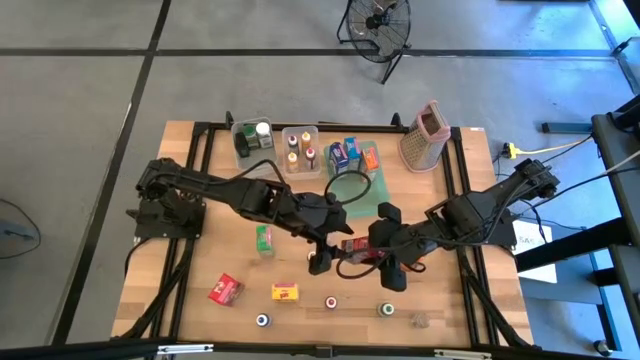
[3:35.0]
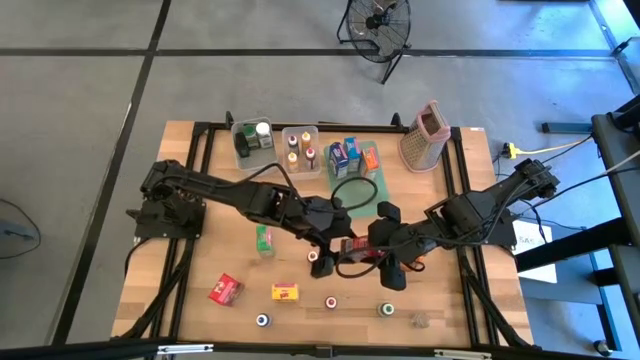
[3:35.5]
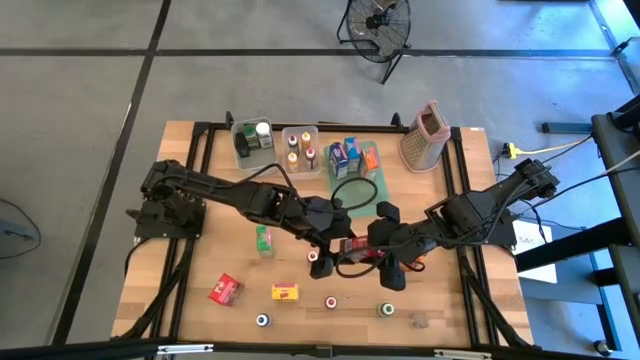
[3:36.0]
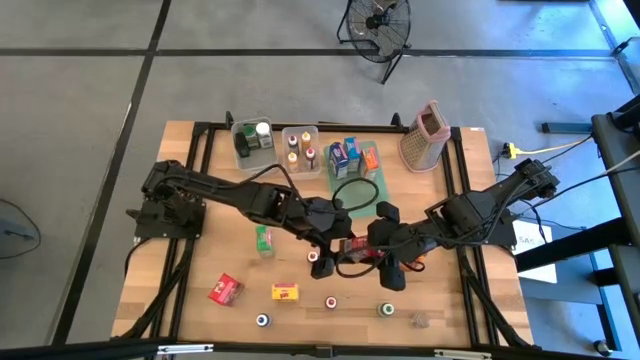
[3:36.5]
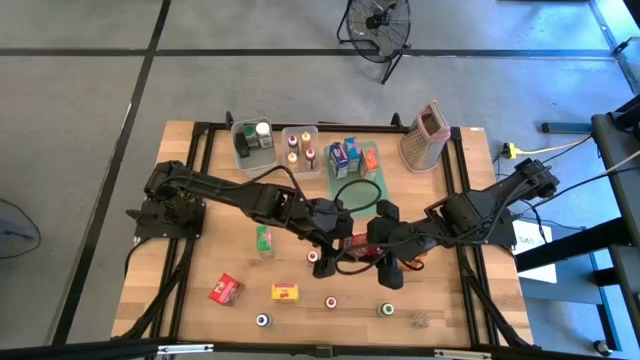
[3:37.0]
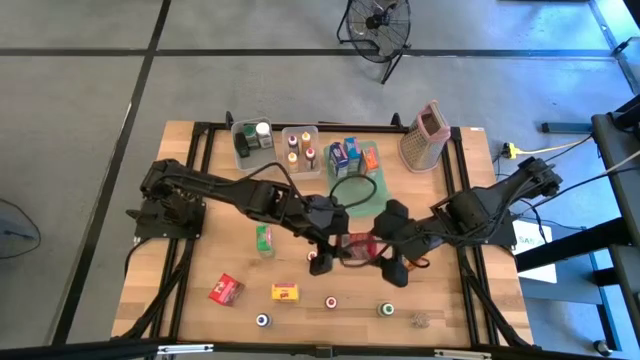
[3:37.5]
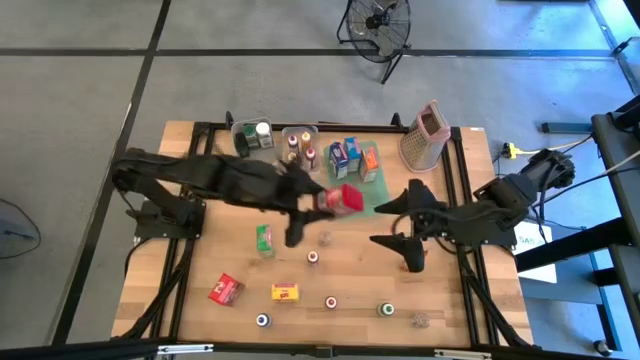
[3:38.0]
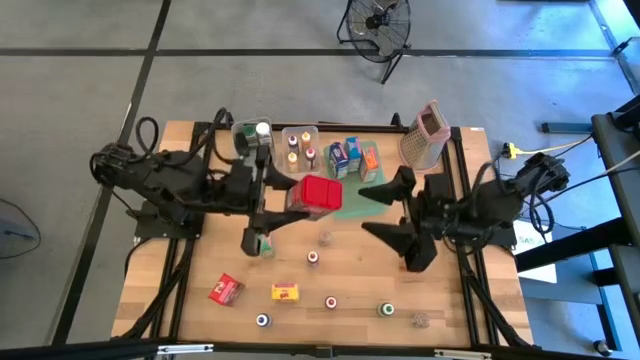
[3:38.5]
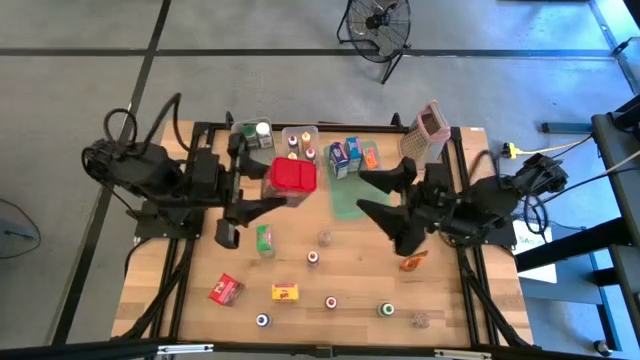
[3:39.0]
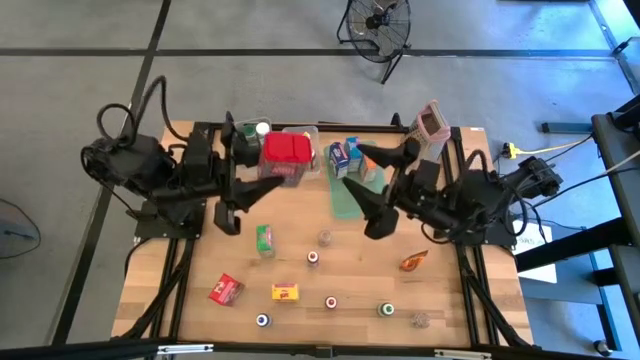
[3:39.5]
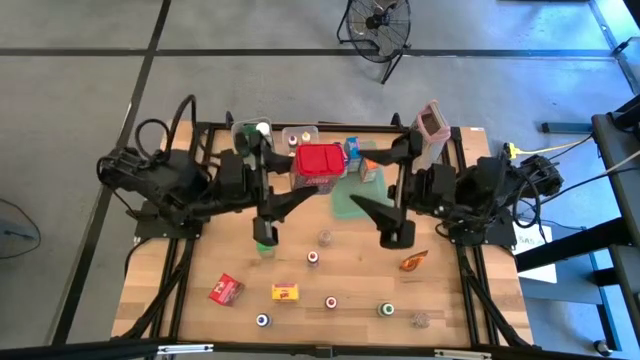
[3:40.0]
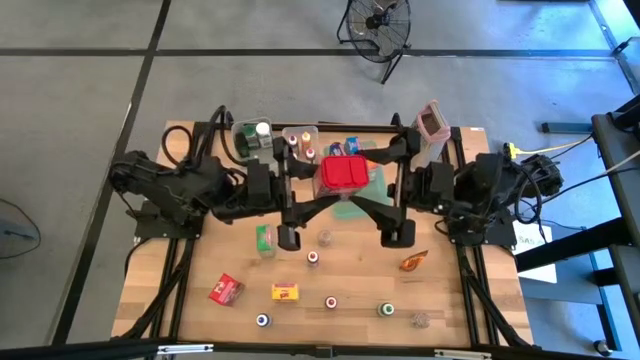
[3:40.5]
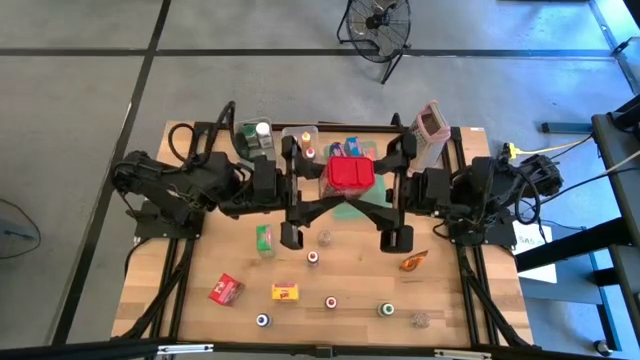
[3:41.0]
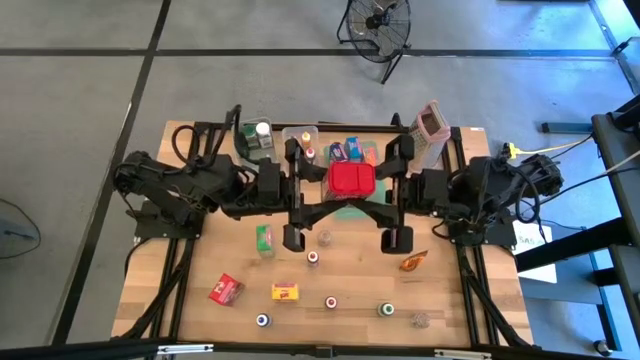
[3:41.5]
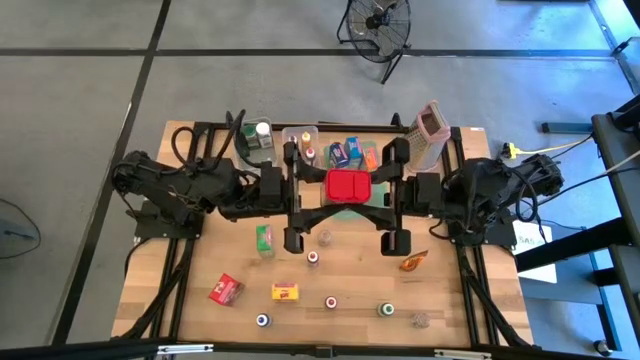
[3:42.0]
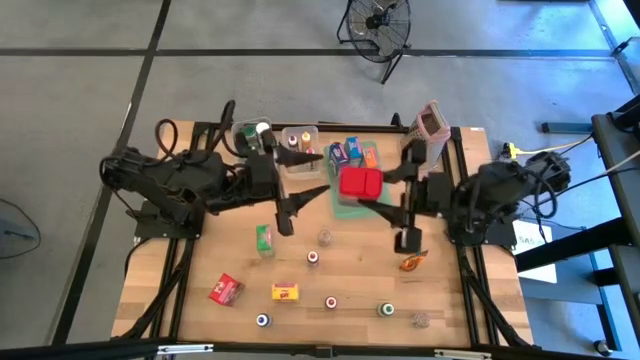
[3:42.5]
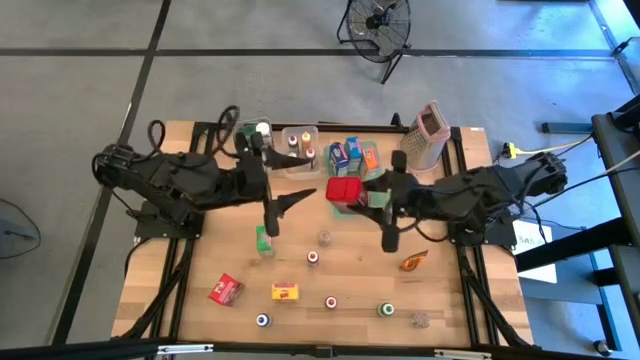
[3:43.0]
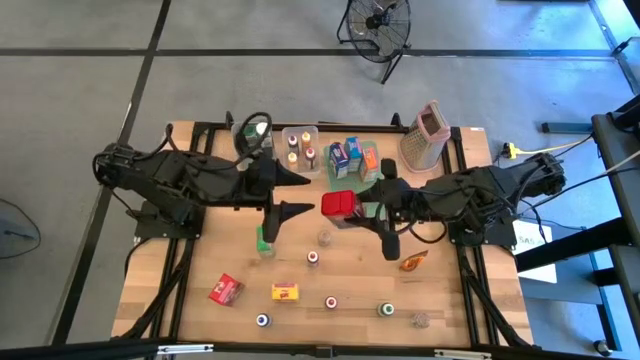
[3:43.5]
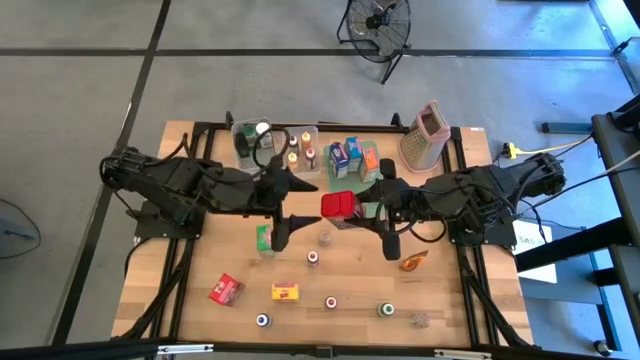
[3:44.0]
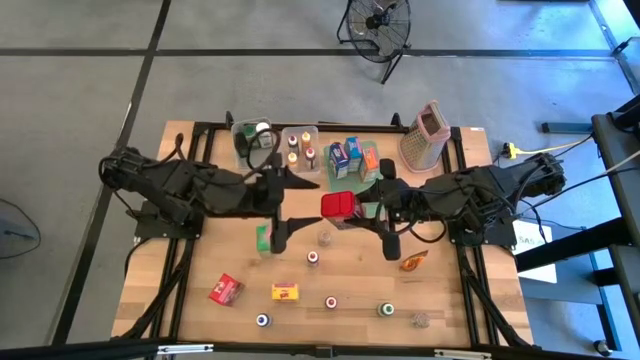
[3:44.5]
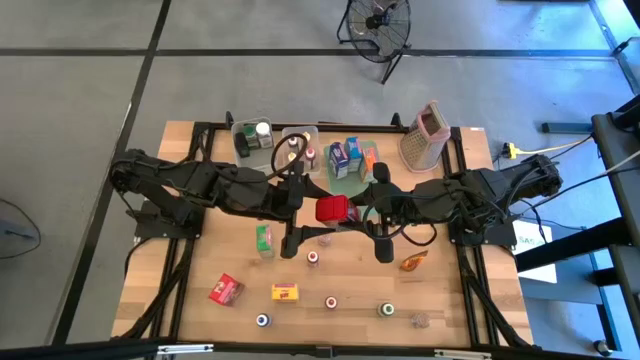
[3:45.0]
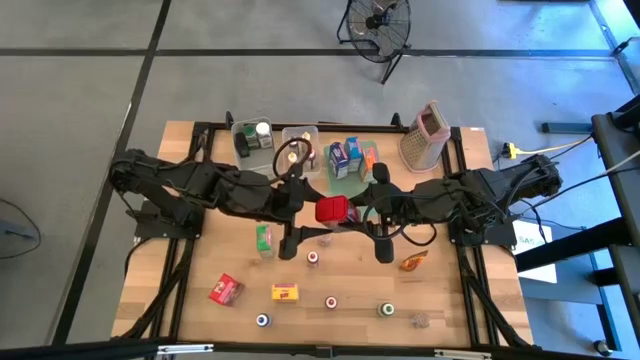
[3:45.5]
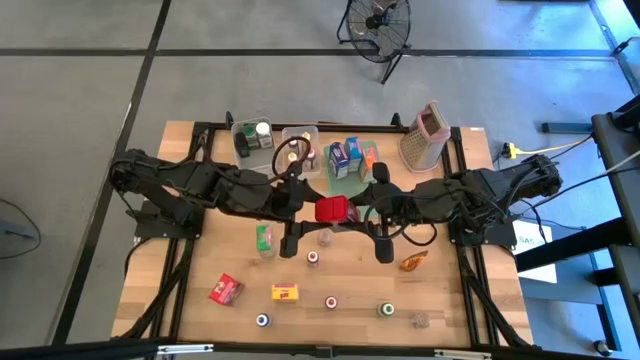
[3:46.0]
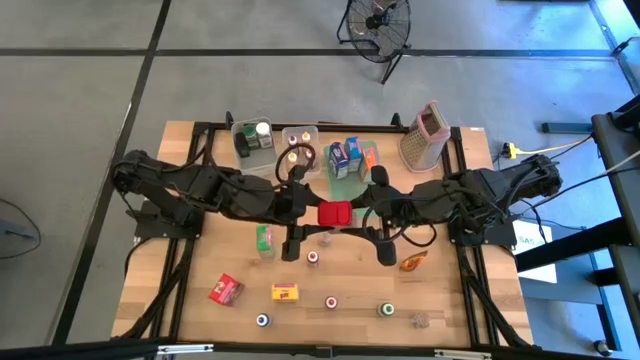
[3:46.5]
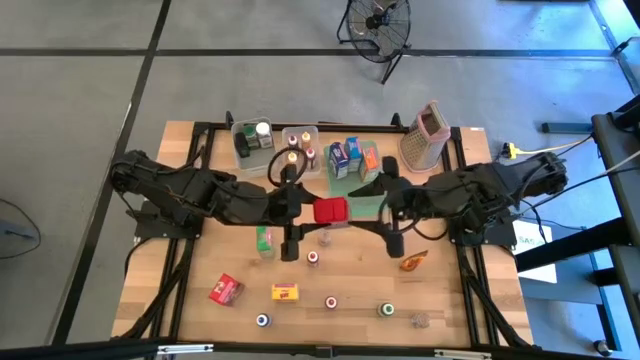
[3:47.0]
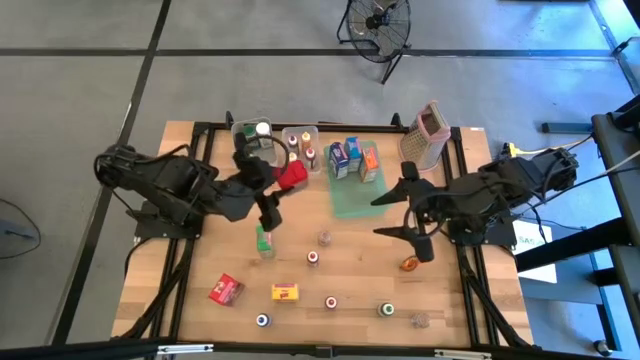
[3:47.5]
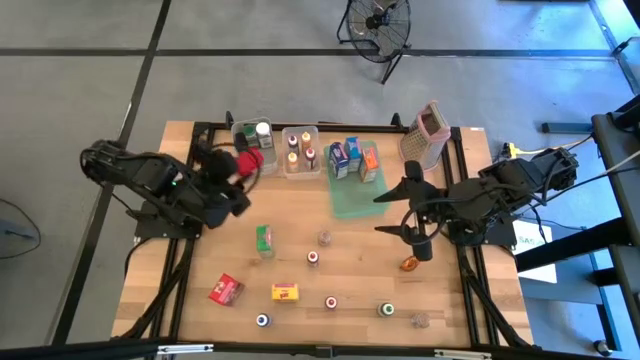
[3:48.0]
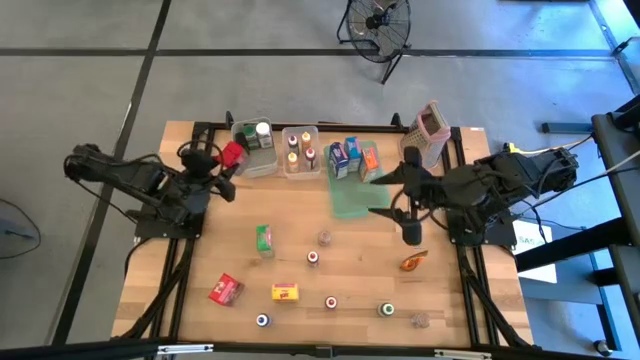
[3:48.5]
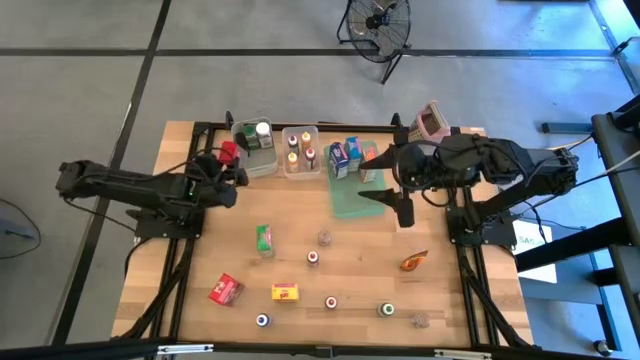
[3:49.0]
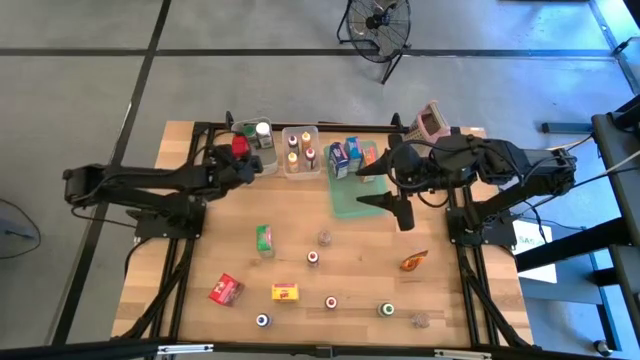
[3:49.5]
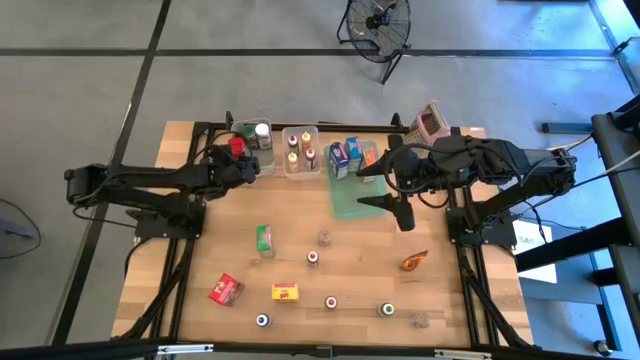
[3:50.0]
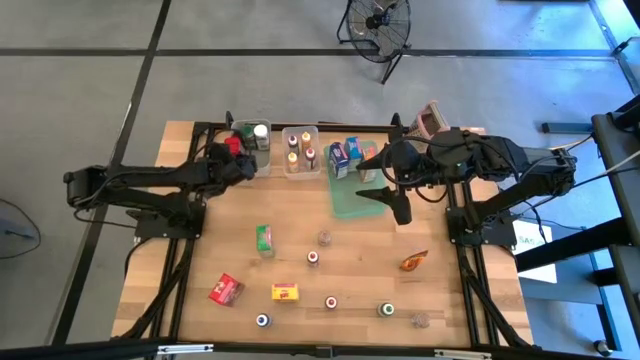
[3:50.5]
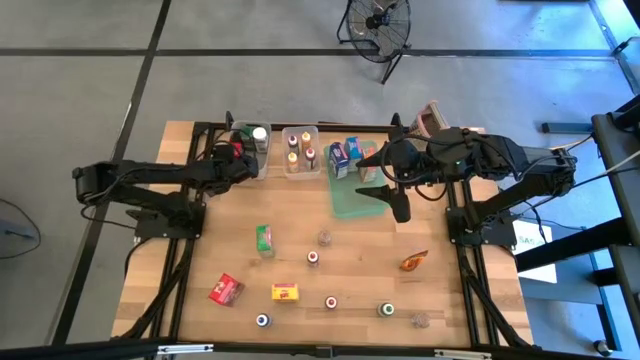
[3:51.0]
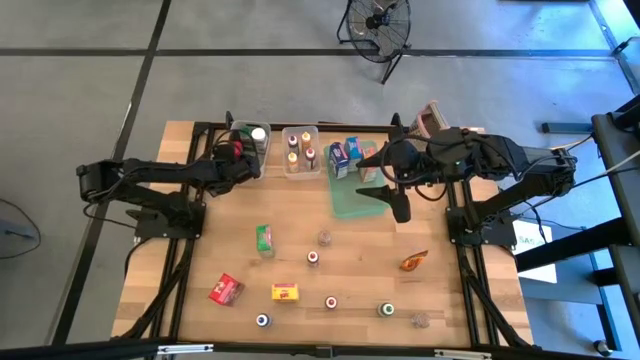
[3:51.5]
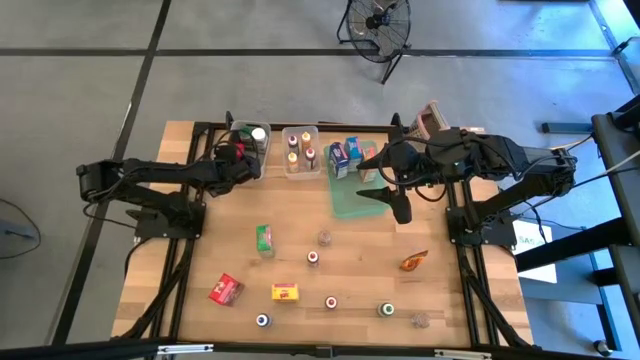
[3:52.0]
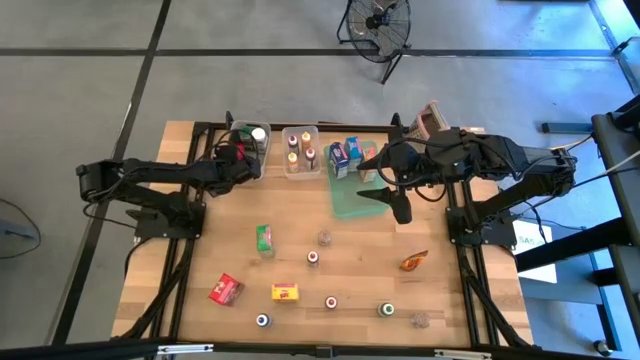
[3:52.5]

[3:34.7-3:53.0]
Task: Pick & Place Kitchen Items
Put the red spice can into the gray bin

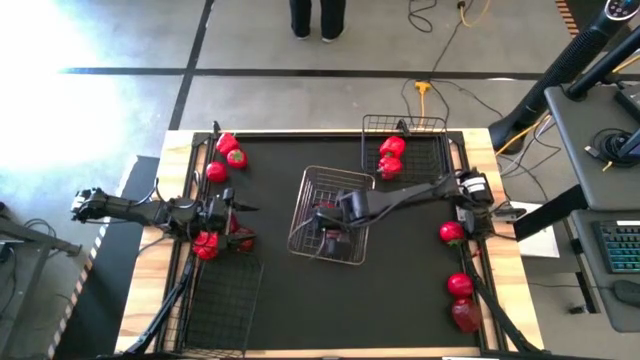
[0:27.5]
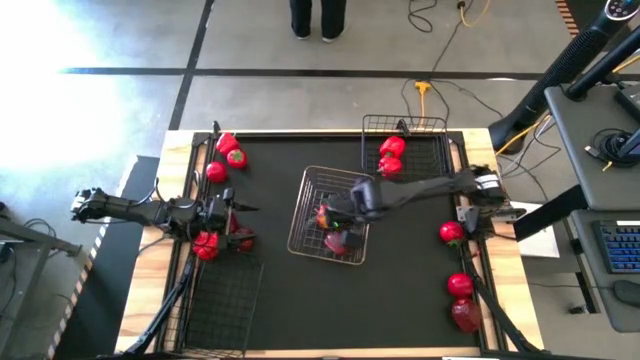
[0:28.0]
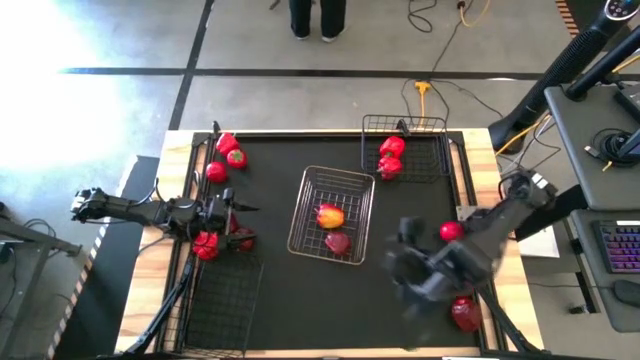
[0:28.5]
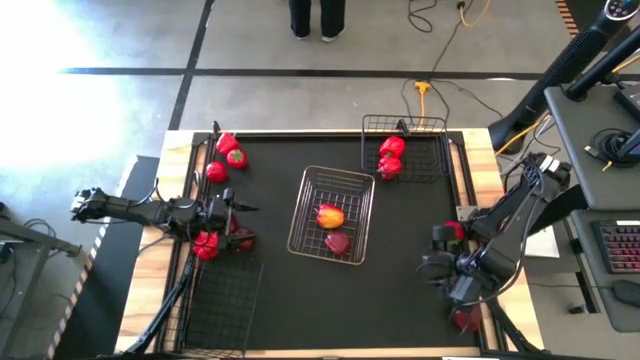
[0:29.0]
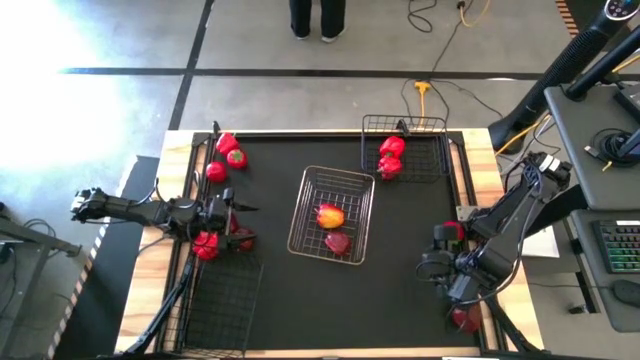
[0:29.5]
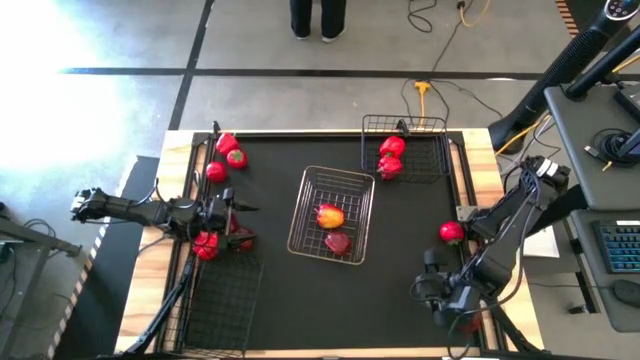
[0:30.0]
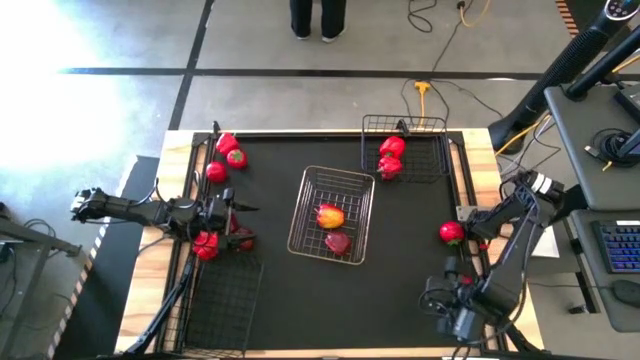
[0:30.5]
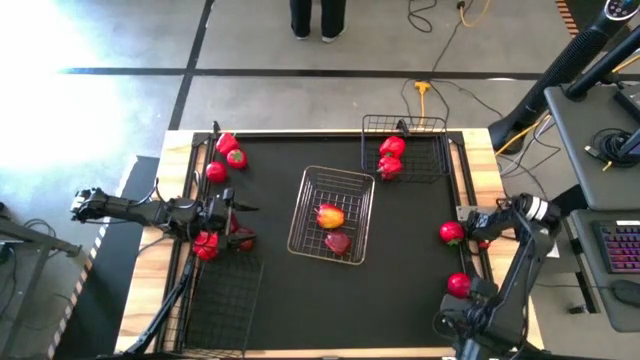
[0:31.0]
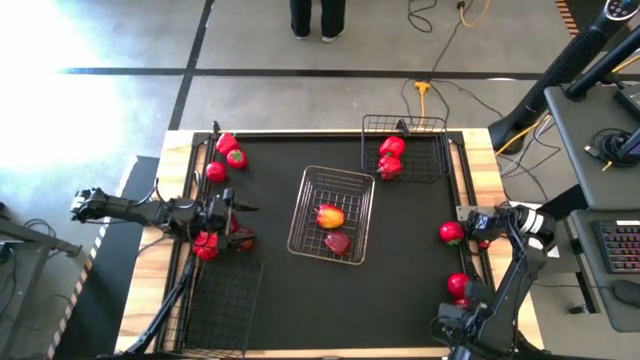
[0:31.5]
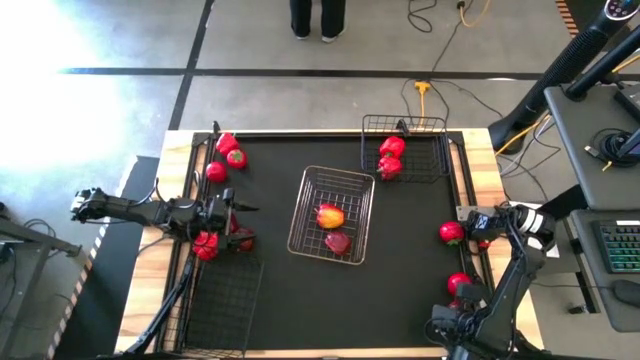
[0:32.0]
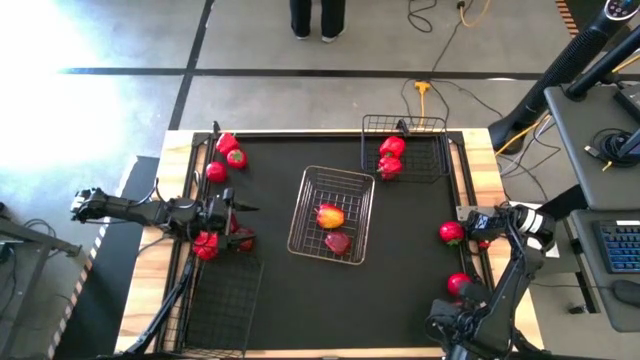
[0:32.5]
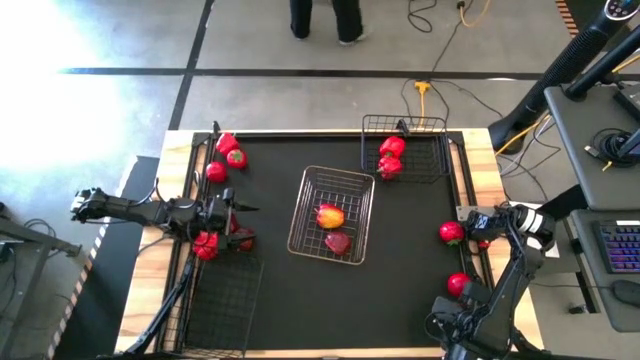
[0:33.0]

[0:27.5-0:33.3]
Task: Sort produce into baskets
Put the red apple into the gold wire basket
